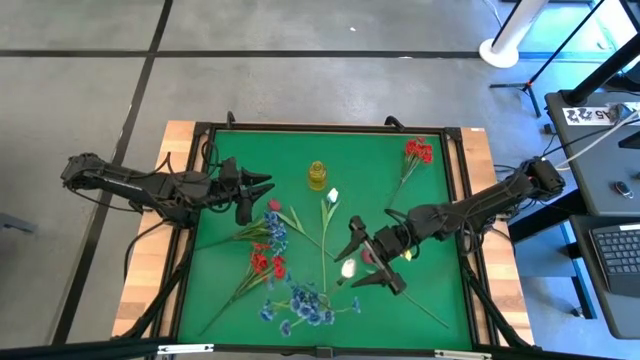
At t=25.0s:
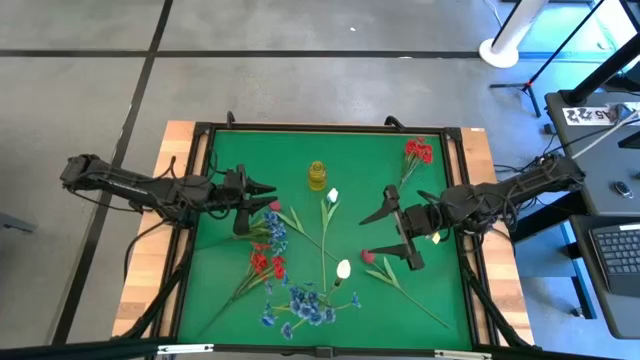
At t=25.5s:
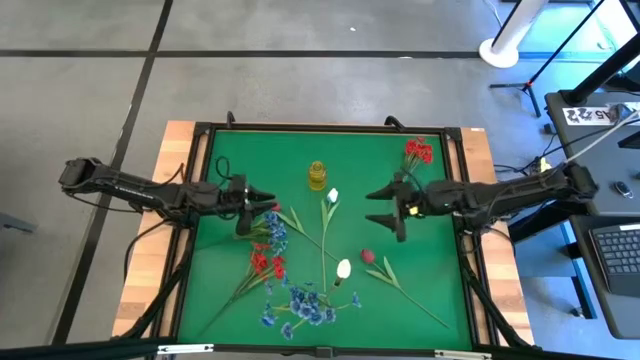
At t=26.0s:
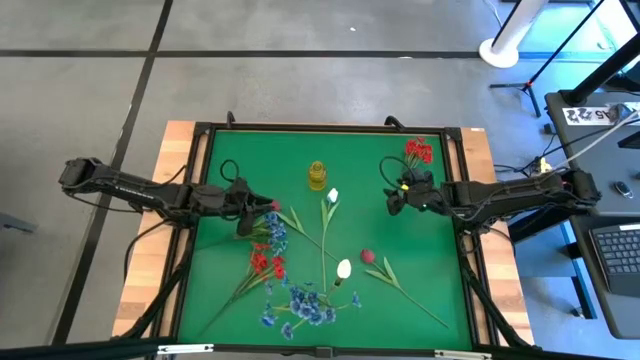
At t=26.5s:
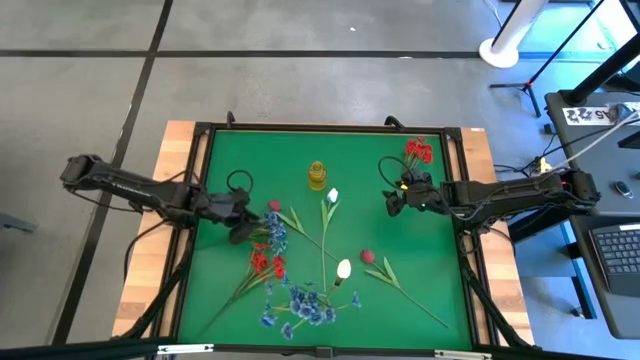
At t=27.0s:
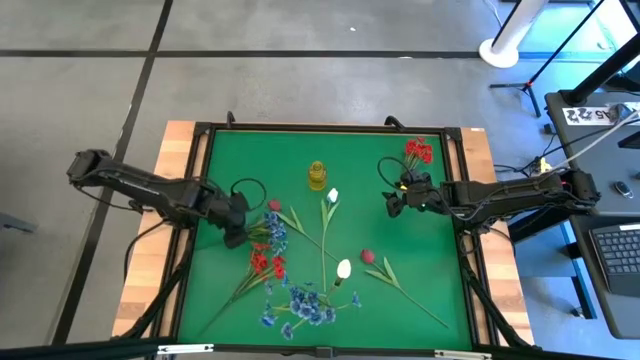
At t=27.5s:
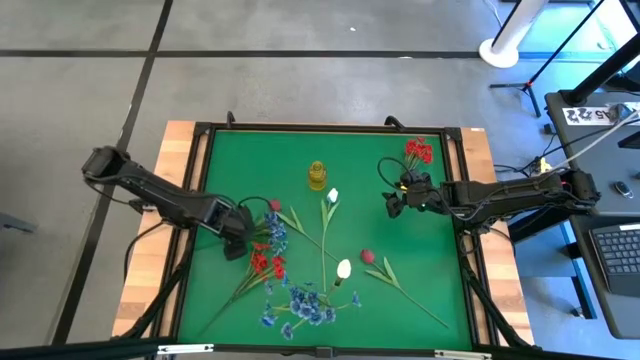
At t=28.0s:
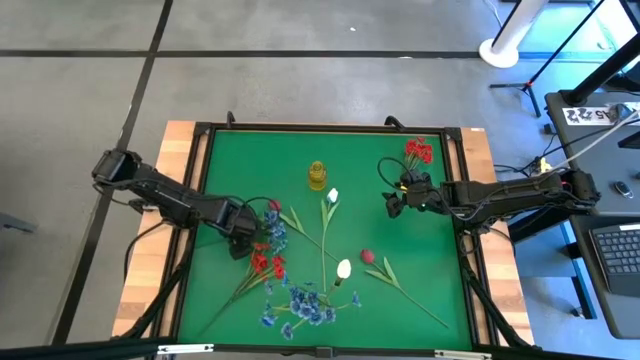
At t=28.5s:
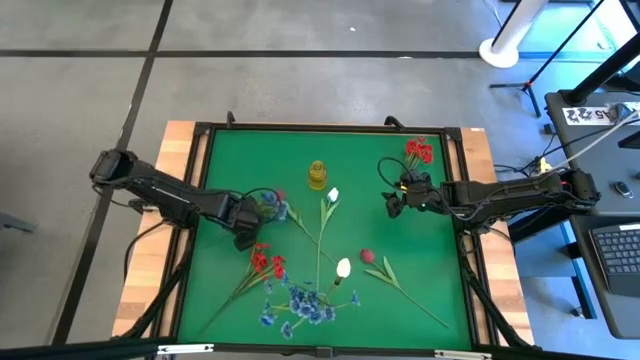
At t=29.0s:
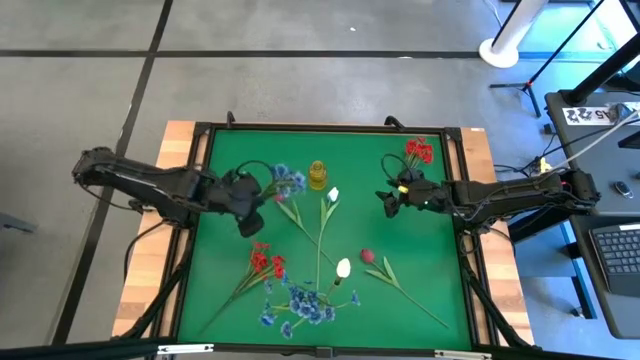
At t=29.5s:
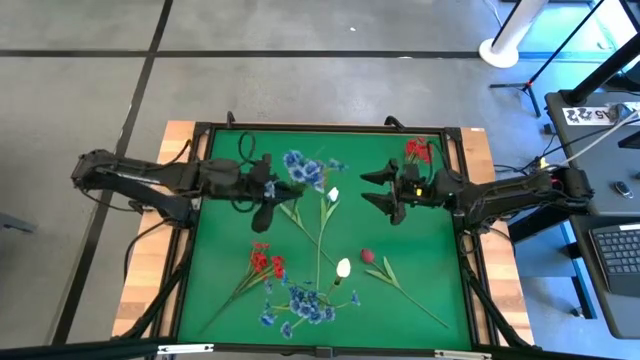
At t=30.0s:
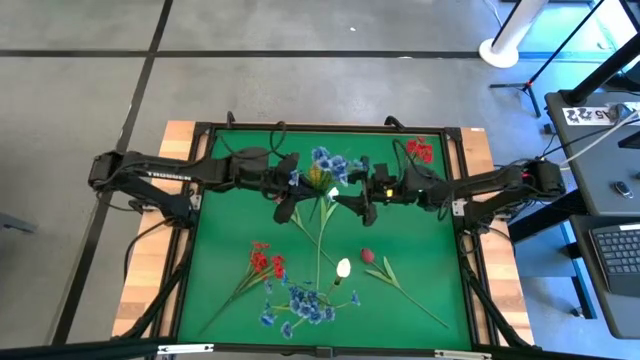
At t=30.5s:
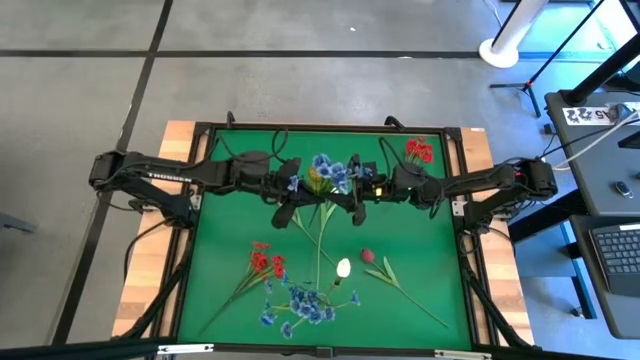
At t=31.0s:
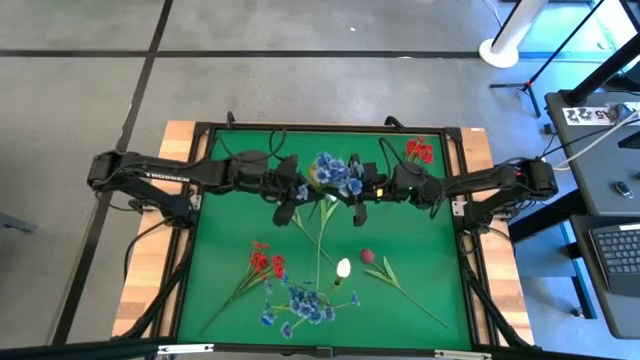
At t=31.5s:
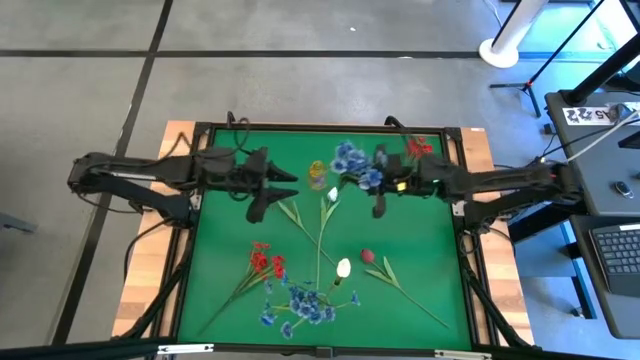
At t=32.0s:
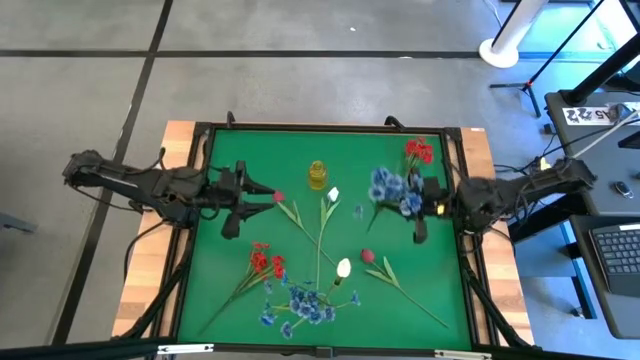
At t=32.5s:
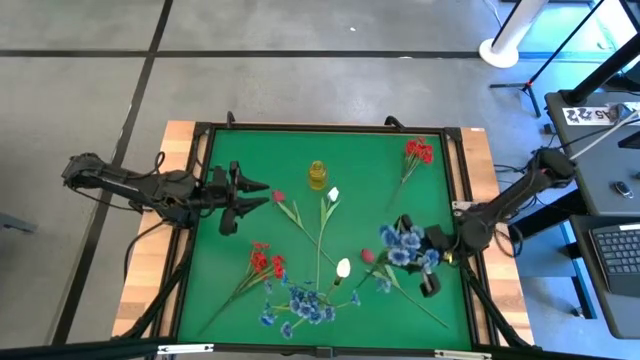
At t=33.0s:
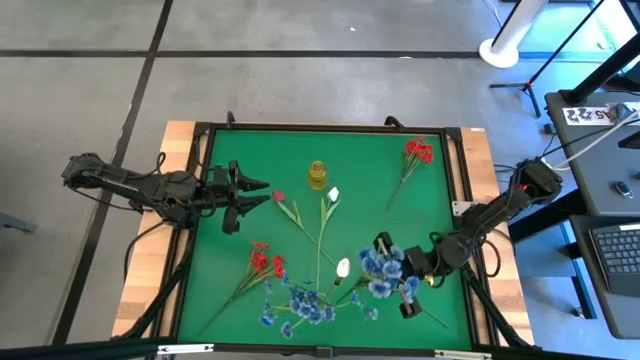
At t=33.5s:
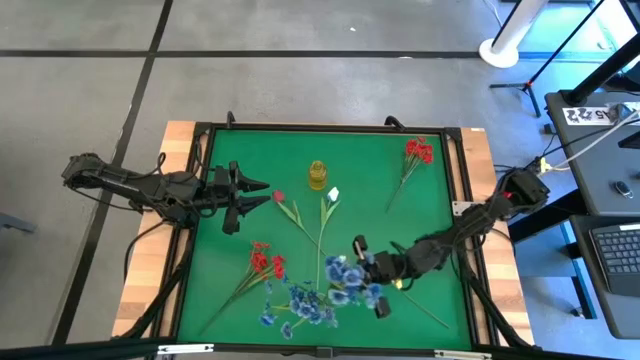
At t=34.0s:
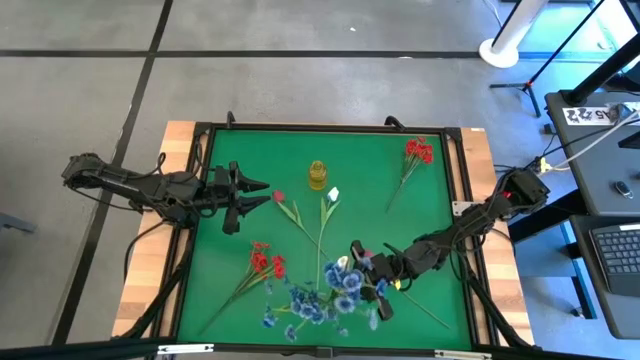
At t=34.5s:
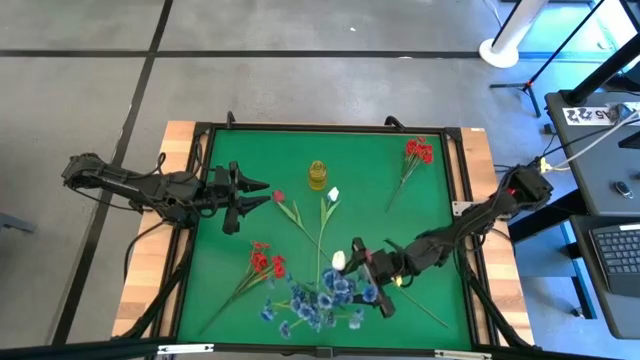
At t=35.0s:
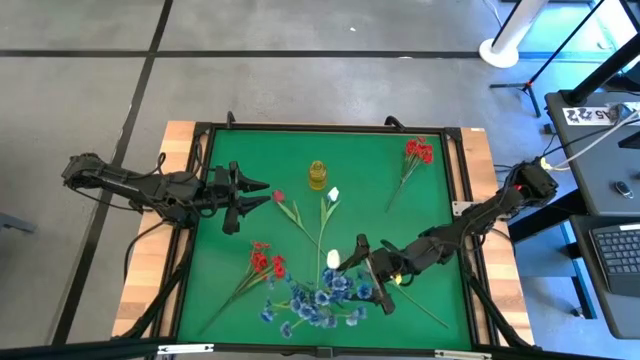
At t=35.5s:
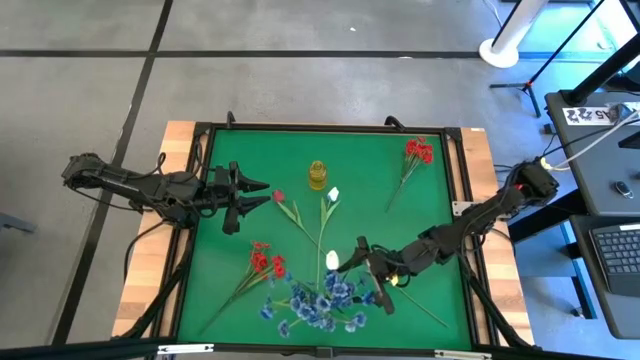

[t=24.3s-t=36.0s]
Task: Sort flowers into vase by color
Put the blue flowers into the transparent vase

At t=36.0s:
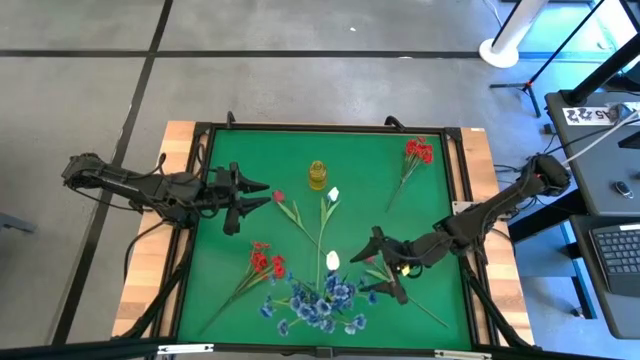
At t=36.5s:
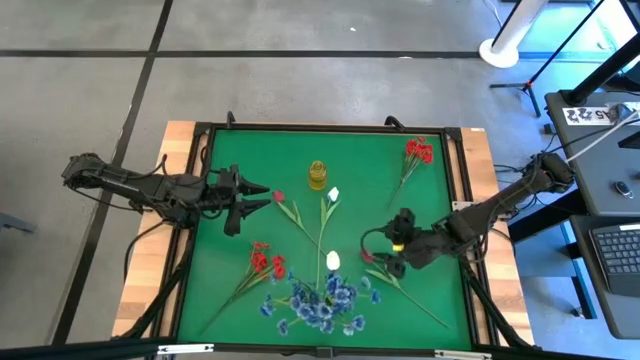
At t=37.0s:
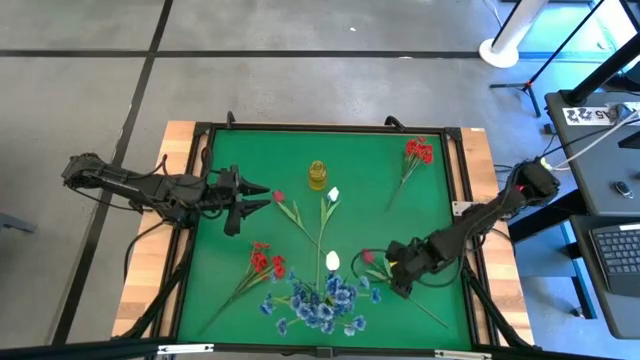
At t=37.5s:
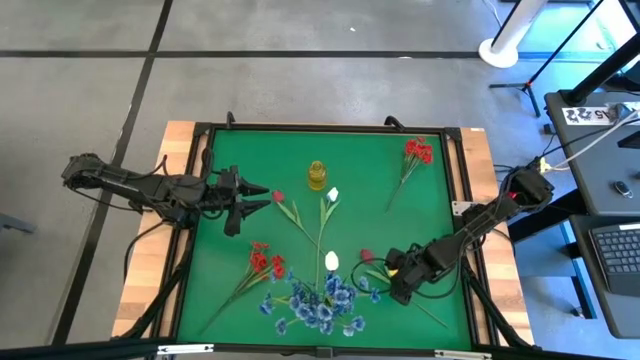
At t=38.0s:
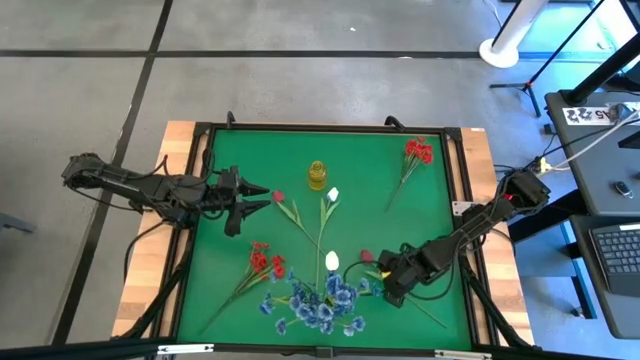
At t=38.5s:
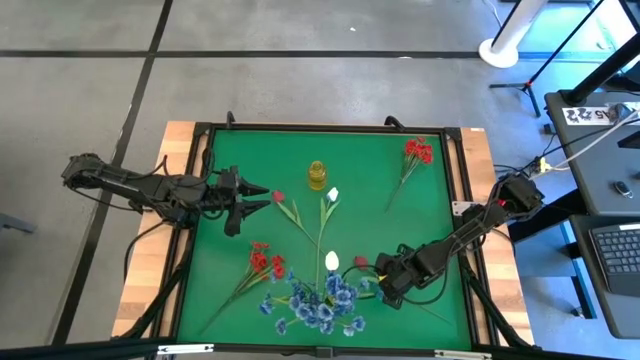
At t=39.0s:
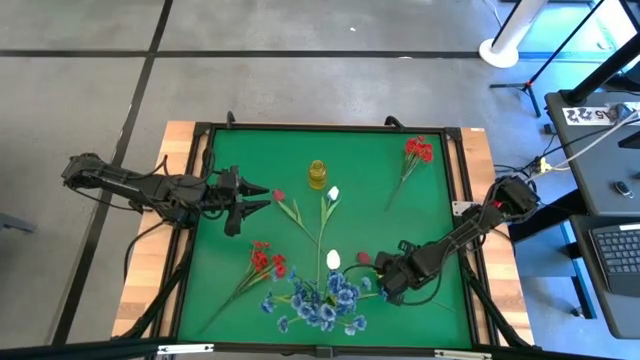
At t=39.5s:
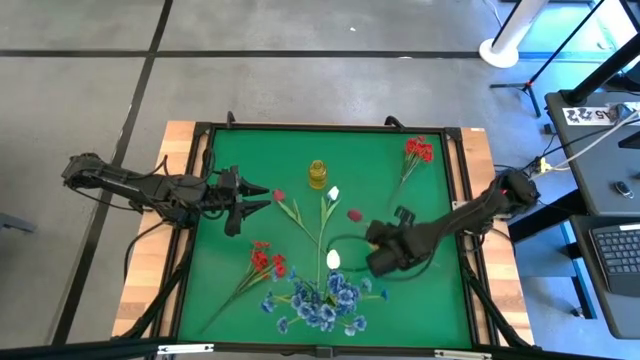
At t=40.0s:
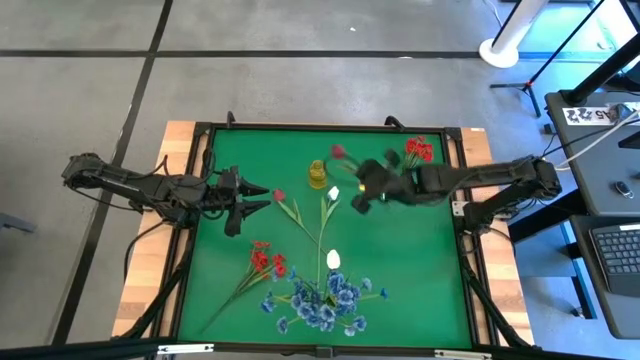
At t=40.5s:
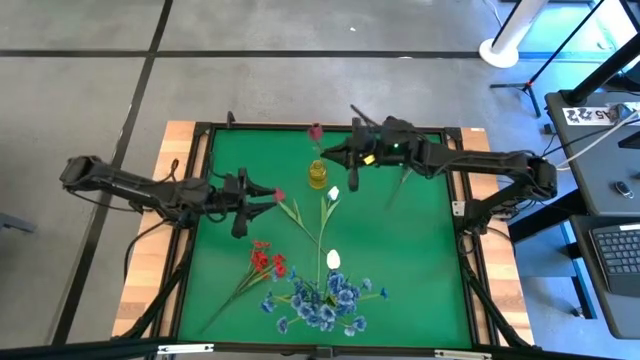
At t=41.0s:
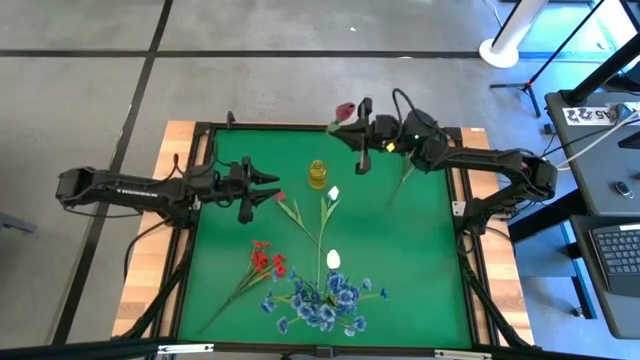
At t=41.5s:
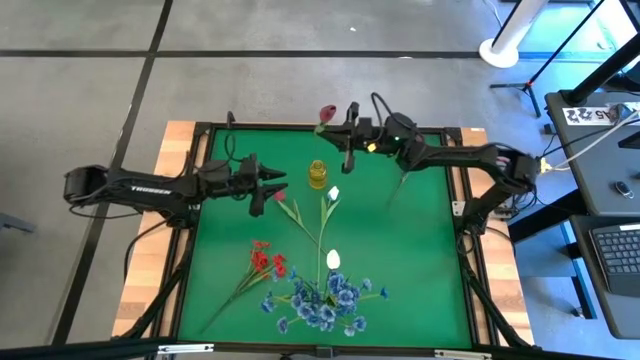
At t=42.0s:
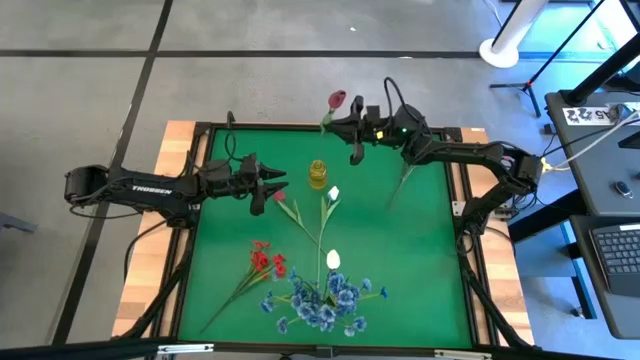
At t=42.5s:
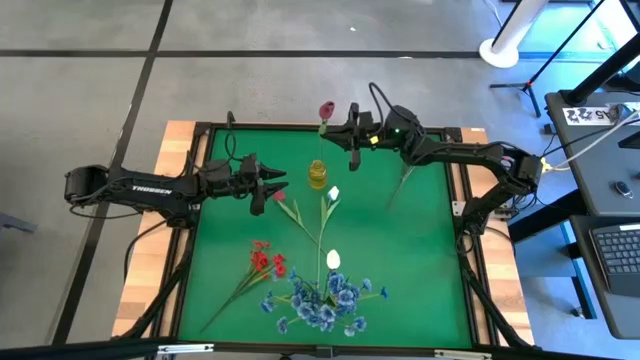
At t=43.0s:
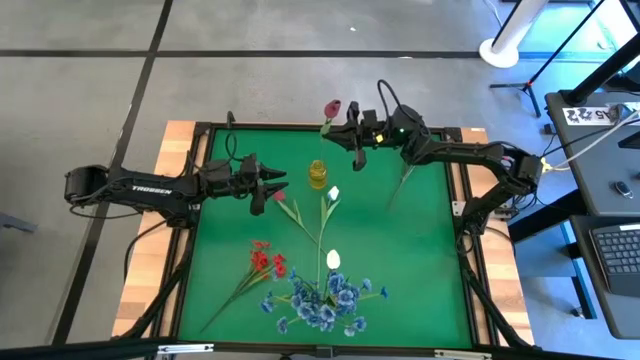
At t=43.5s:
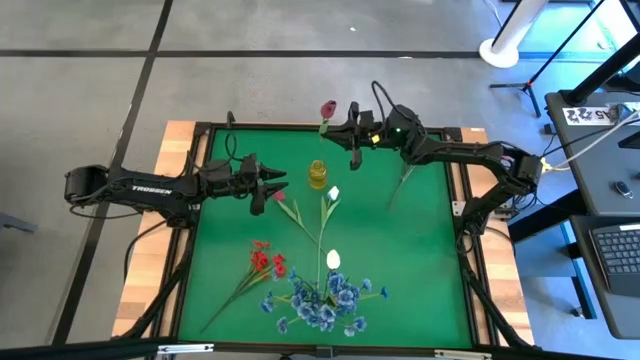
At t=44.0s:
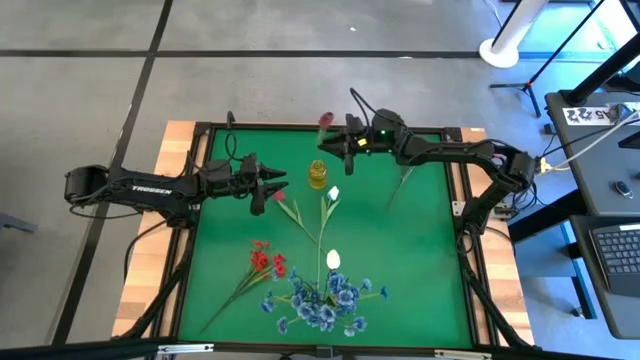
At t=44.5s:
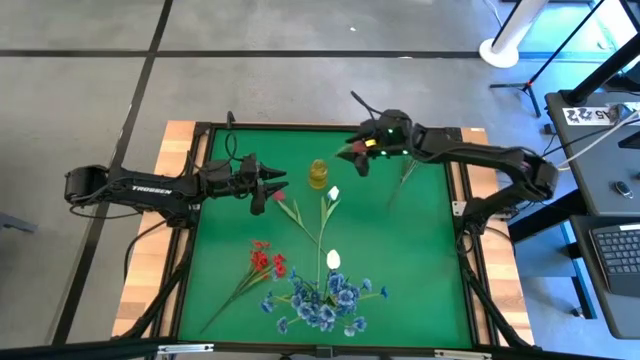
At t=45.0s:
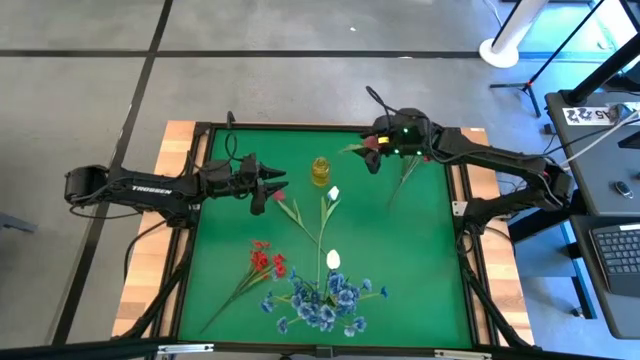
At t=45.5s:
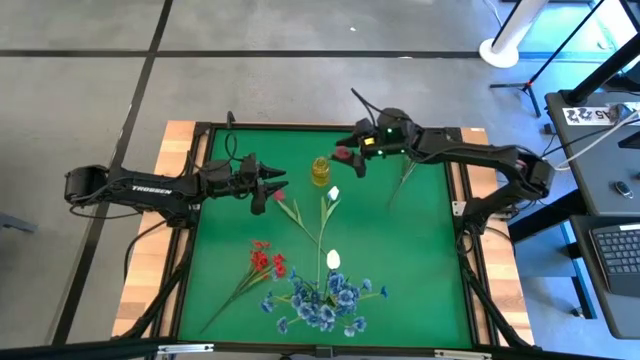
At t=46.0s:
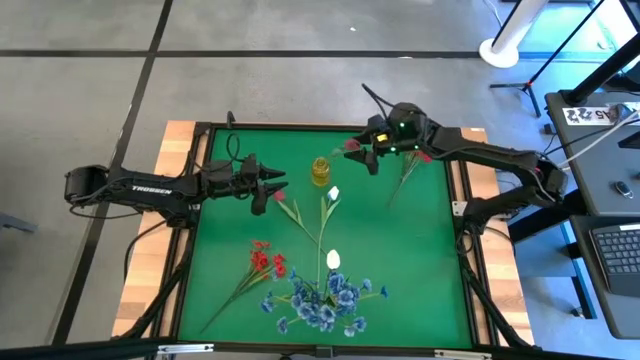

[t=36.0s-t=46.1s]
Put the bottom dark red tulip into the yellow vase
